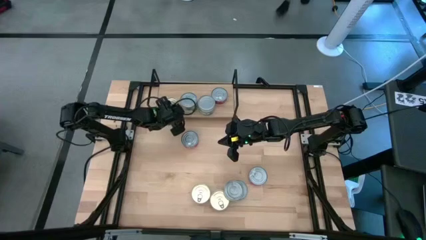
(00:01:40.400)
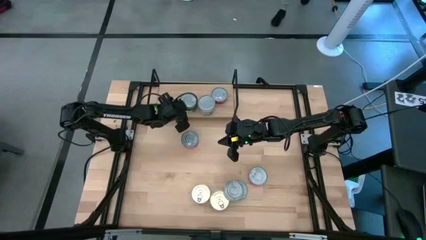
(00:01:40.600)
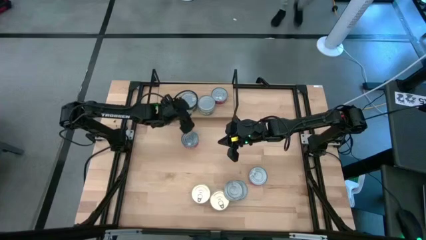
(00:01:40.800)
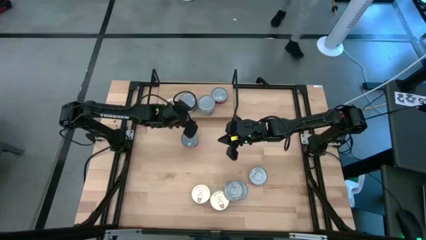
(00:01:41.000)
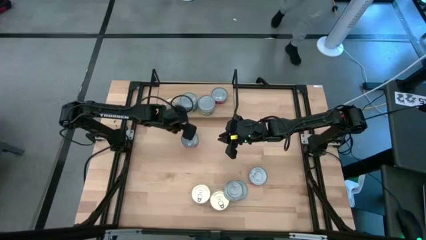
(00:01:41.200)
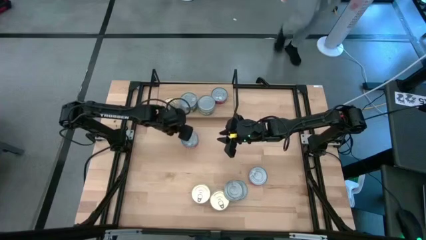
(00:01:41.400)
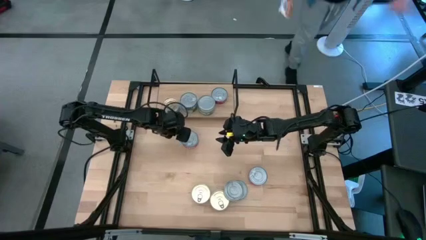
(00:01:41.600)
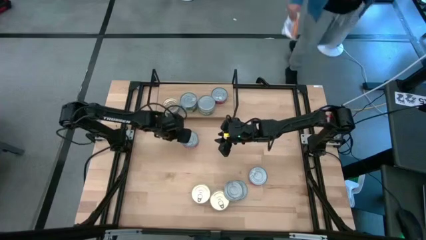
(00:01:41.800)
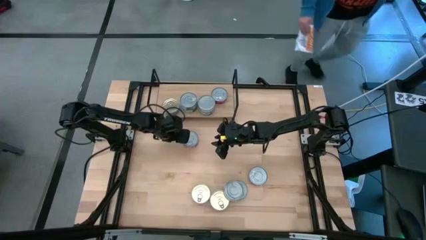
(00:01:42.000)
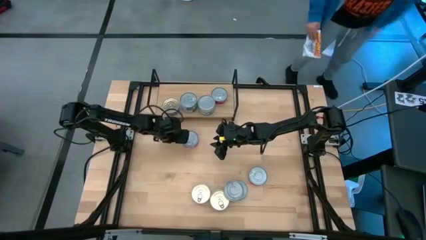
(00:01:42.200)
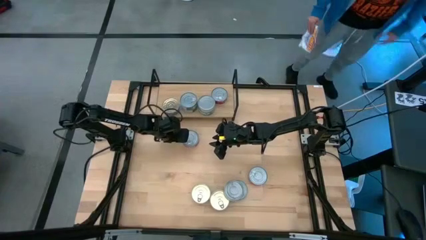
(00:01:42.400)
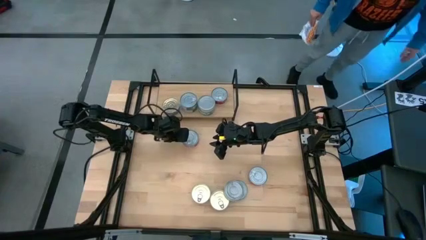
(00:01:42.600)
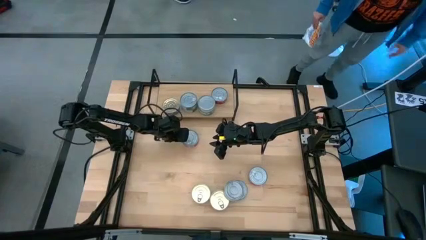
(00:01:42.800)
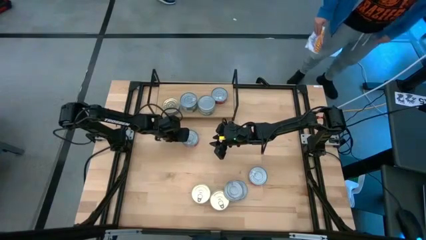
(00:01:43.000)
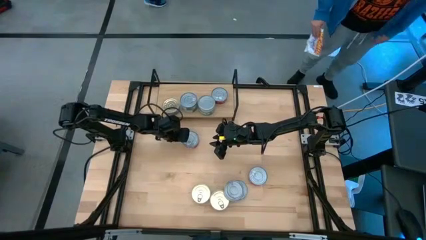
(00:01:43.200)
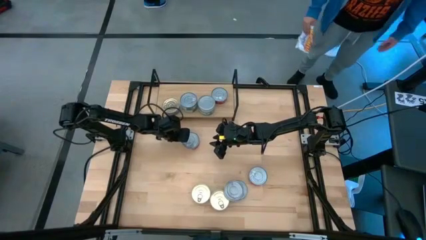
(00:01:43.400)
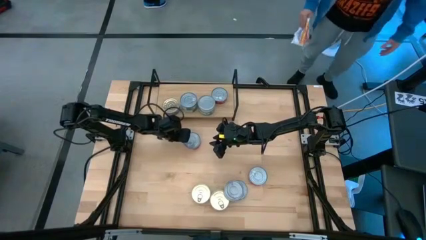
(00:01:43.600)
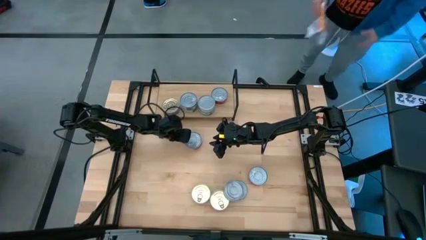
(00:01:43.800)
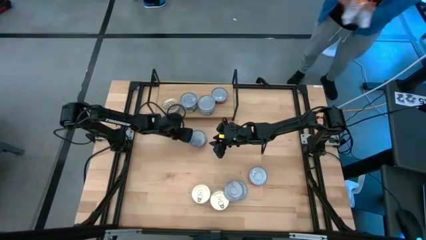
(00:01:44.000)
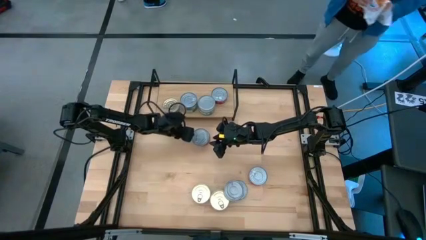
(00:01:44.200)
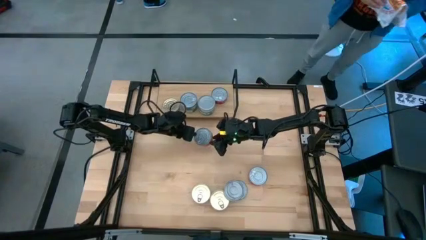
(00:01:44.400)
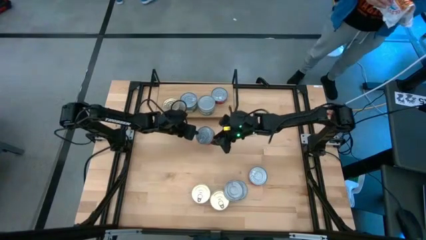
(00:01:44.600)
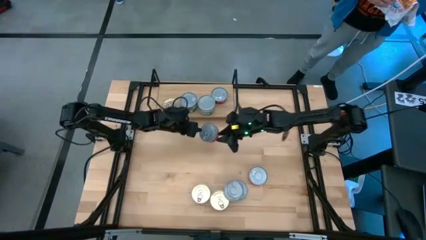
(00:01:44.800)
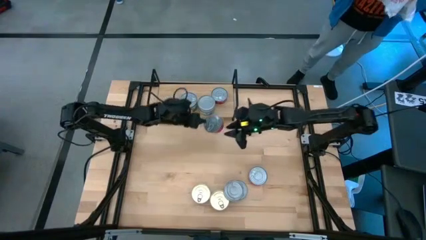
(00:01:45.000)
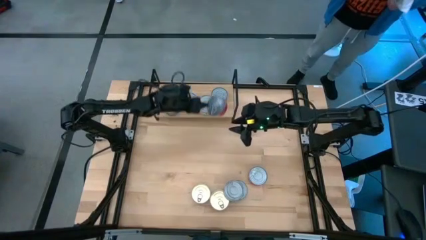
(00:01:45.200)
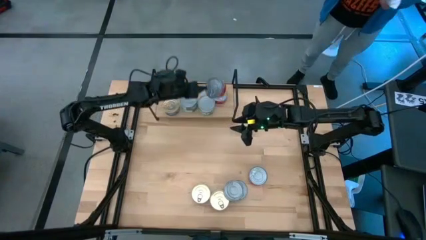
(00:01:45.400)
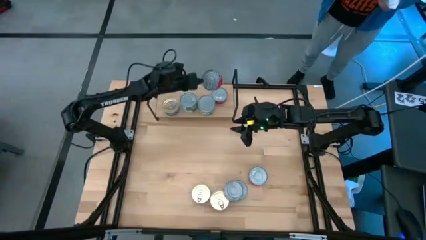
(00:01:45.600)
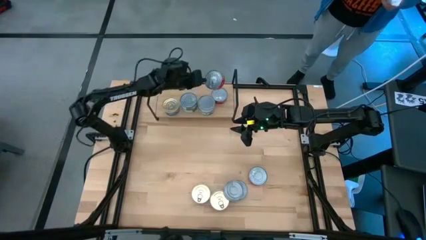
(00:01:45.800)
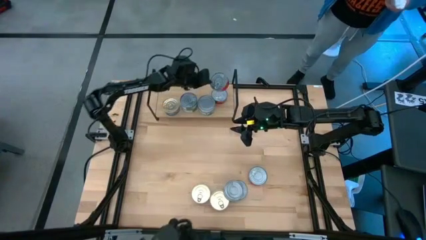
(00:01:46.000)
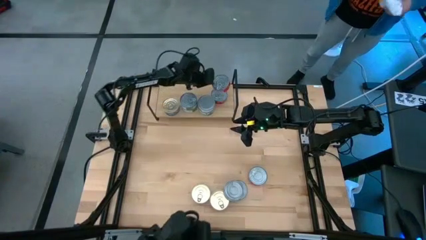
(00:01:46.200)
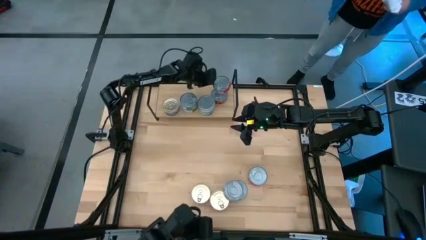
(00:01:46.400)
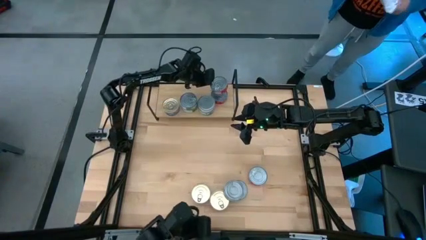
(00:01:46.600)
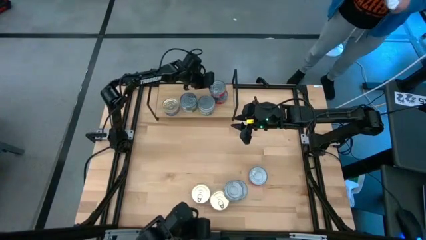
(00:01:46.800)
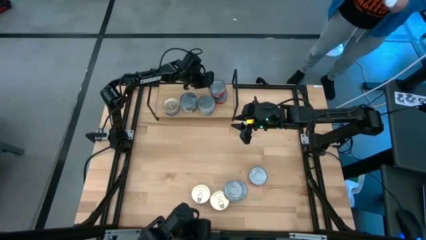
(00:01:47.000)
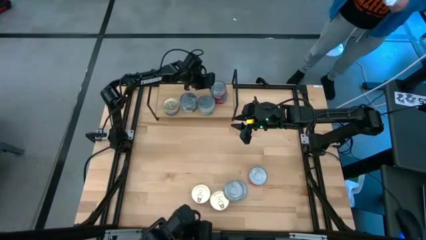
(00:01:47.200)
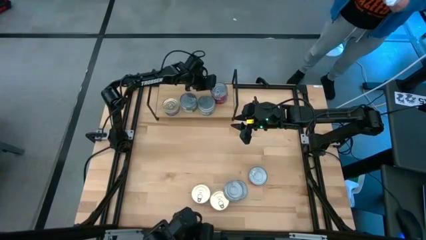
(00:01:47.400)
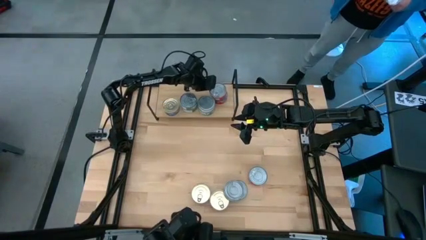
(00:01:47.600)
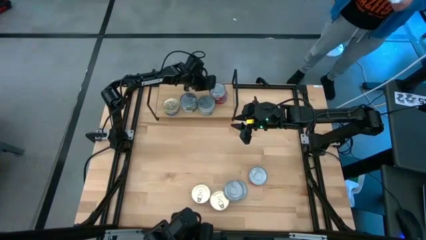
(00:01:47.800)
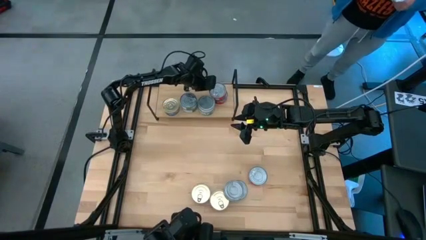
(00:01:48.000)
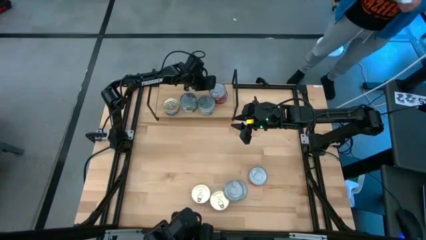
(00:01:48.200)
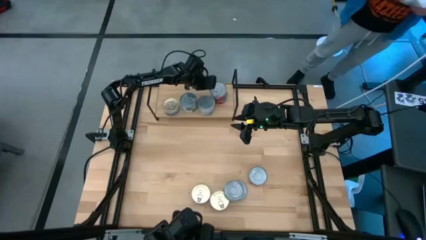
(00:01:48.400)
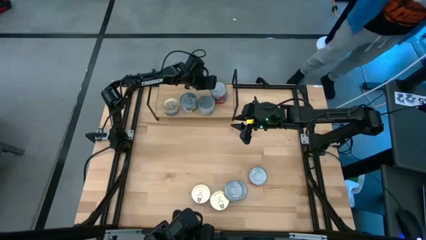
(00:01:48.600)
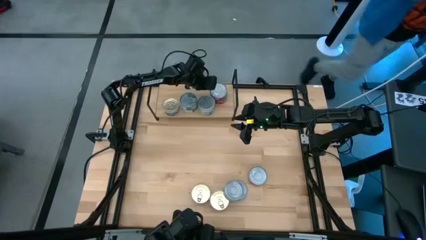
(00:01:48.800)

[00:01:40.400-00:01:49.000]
Task: Stack canned seafood by type on shelf
Stack the red tuna can on top of the other red tuna can on the shelf

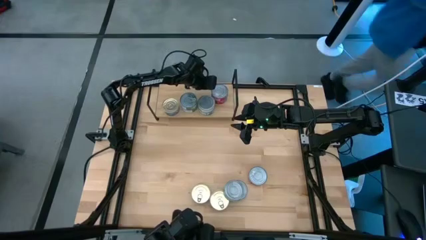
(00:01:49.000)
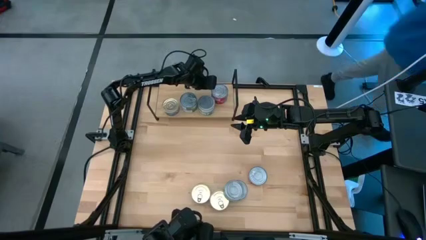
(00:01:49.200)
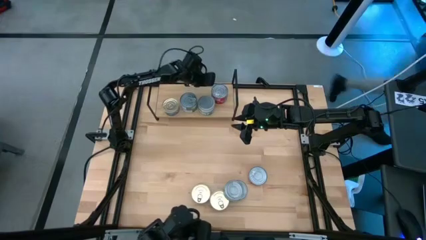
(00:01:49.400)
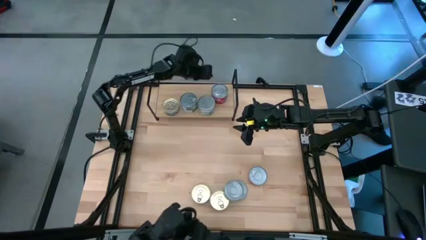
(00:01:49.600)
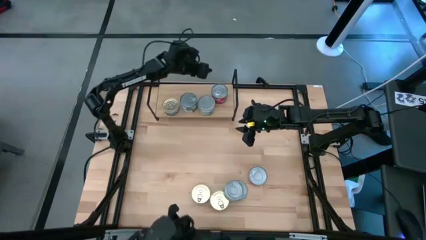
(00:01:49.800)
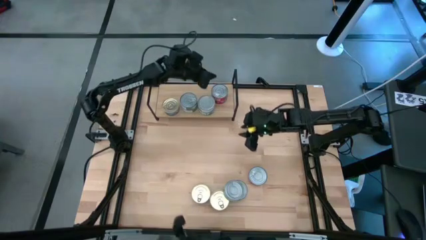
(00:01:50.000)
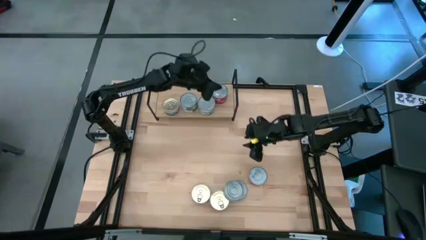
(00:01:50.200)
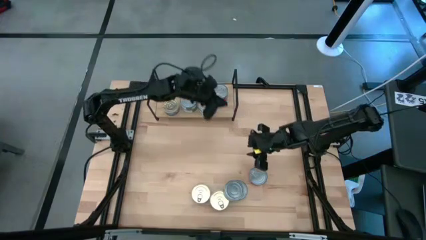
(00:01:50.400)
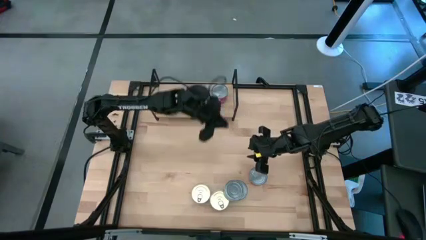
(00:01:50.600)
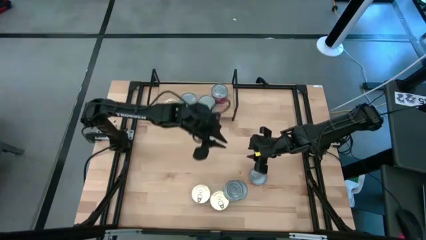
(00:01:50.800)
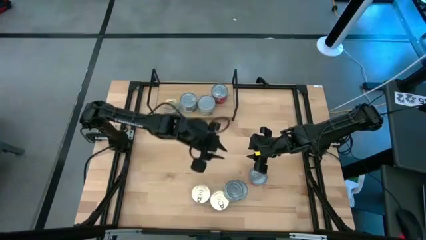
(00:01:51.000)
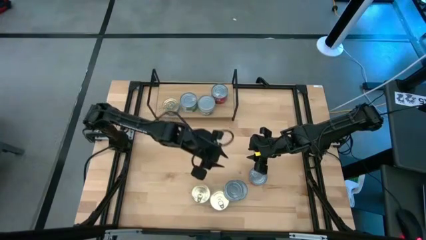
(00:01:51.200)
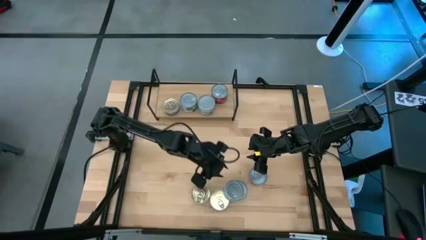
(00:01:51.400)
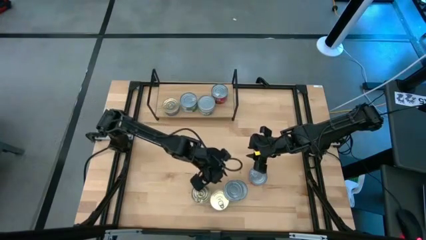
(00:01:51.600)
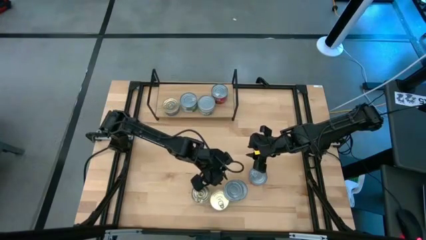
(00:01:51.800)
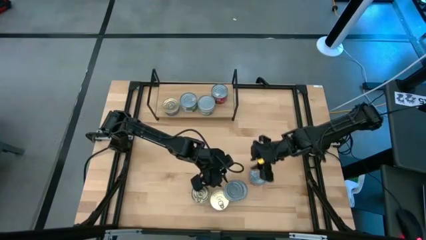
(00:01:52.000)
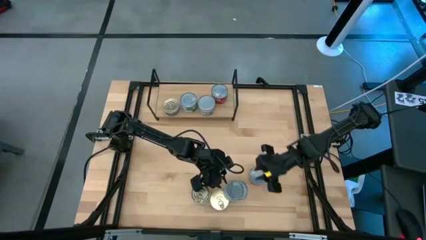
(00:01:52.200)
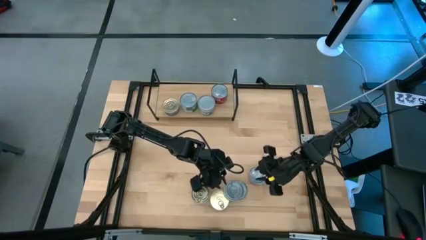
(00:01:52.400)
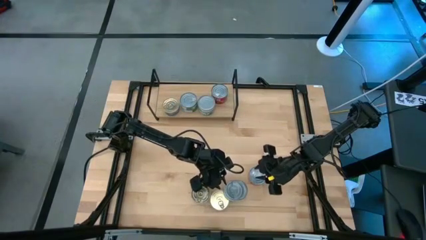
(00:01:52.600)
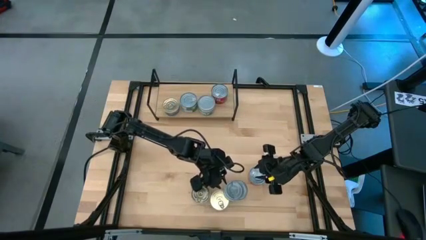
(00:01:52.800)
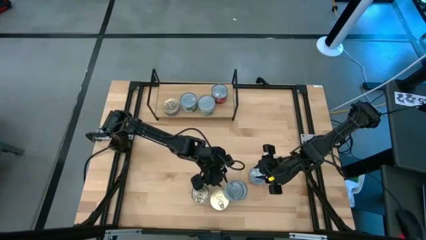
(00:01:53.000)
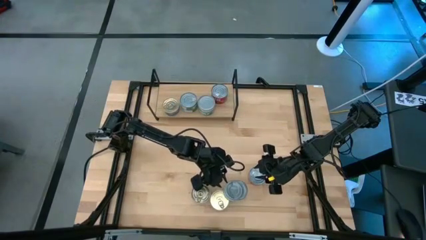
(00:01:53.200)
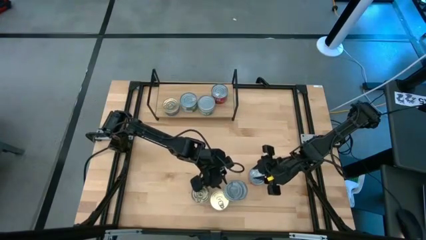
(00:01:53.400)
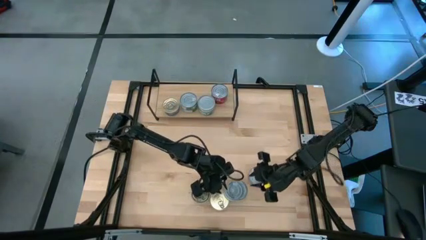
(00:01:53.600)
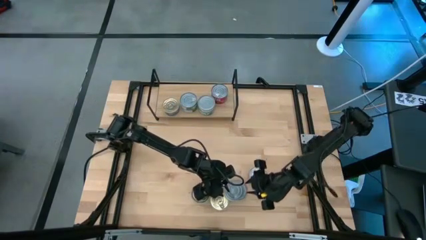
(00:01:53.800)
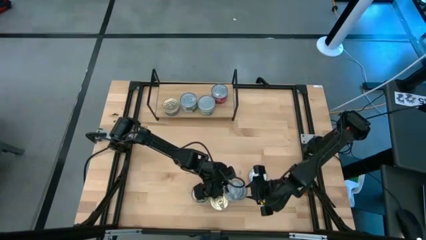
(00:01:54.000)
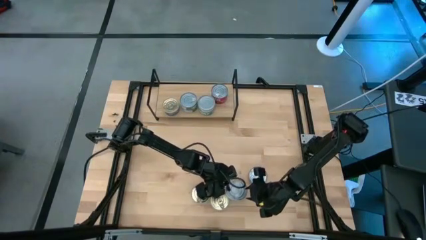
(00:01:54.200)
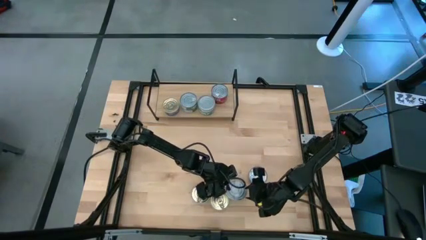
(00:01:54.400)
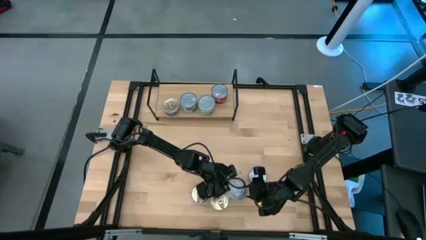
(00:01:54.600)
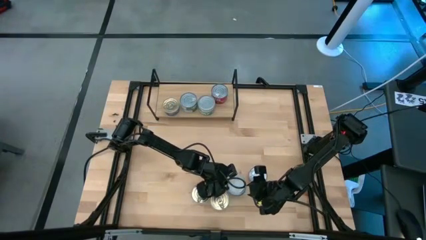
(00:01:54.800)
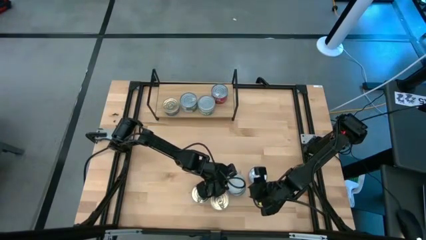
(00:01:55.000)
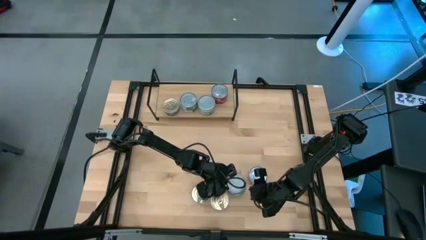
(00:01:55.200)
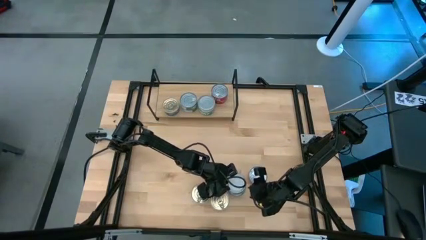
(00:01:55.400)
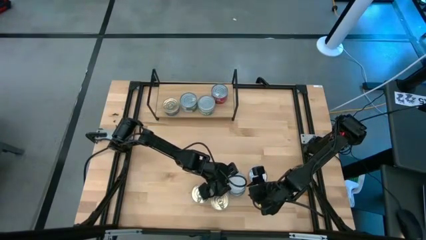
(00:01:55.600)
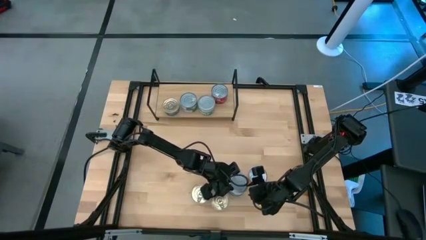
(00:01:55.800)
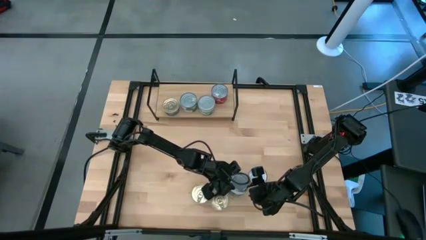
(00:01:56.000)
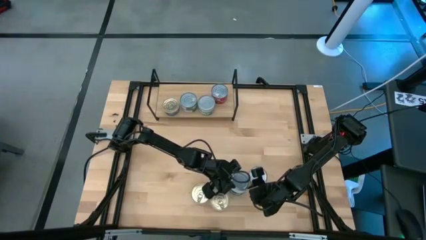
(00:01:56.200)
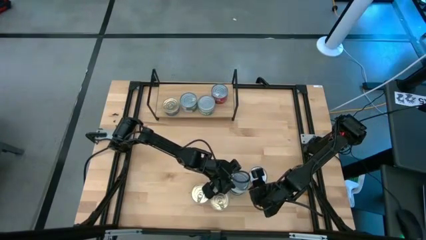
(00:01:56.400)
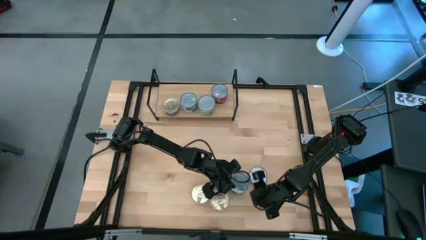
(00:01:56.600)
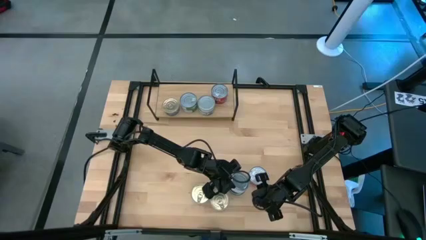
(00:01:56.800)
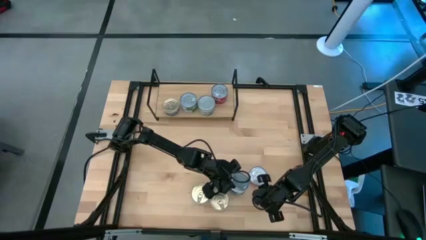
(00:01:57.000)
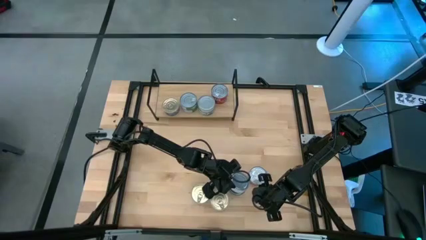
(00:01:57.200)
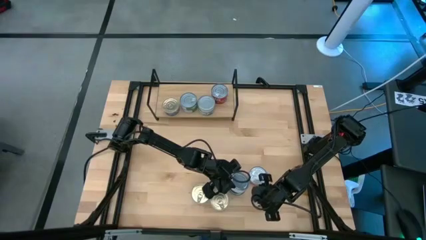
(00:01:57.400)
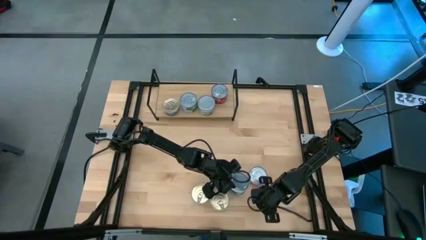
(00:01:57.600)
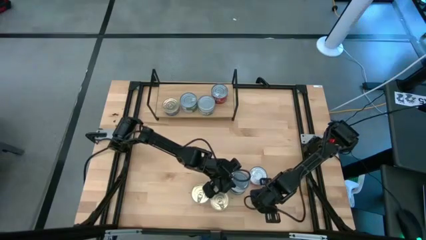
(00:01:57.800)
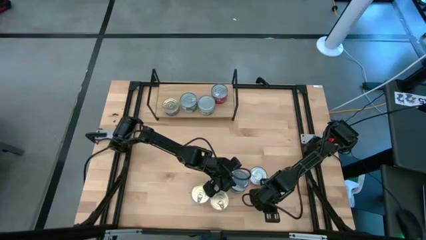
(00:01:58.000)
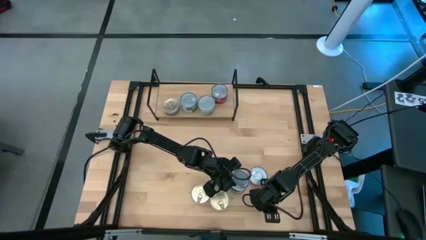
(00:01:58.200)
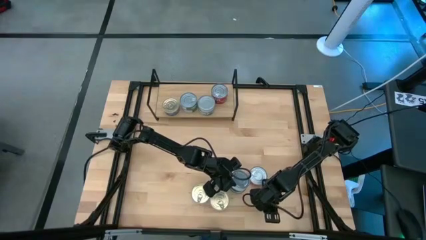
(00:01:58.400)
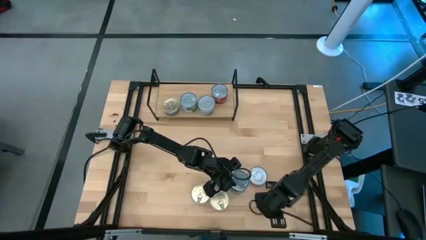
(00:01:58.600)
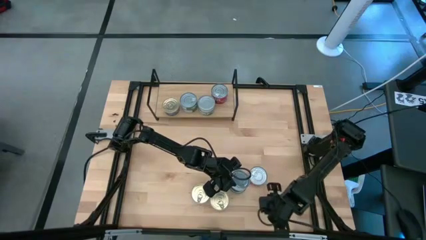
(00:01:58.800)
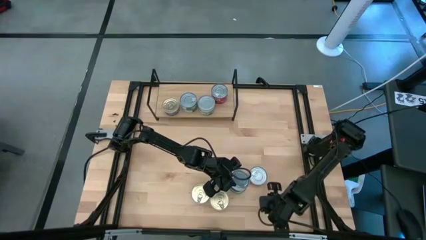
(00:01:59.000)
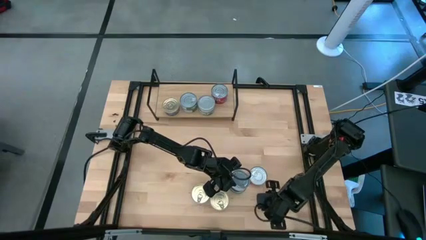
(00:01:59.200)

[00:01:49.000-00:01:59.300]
Stack the green white tuna can on top of the other green white tuna can on the shelf
